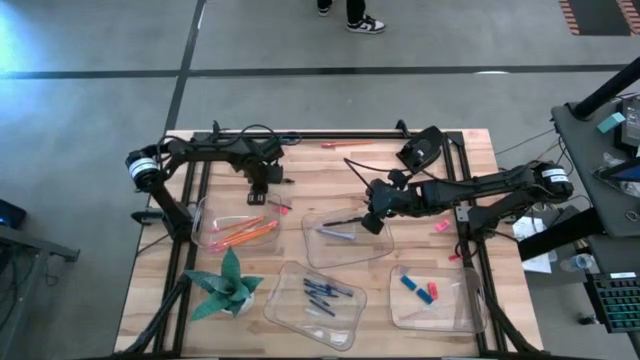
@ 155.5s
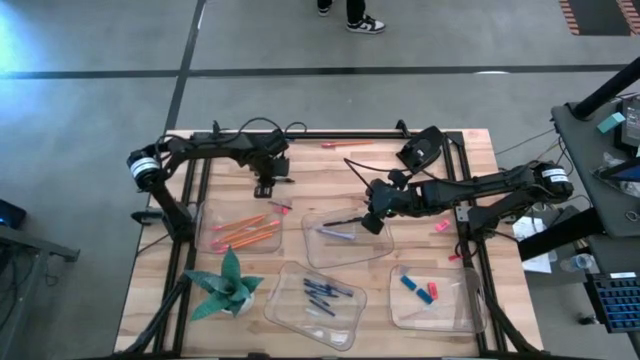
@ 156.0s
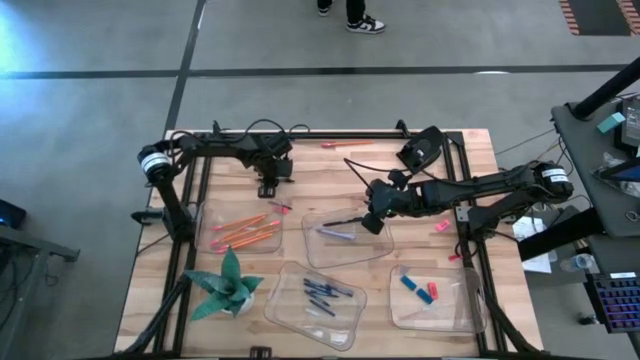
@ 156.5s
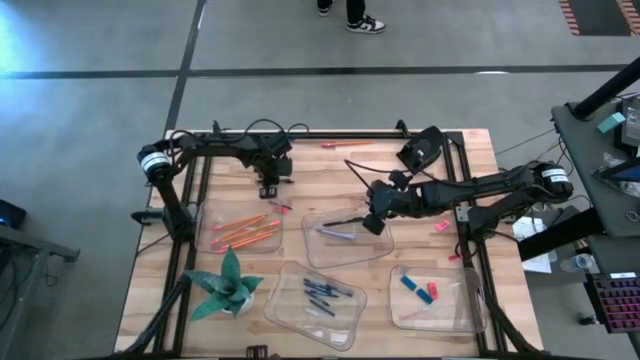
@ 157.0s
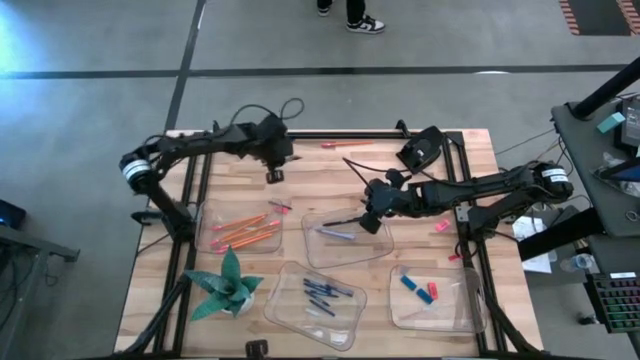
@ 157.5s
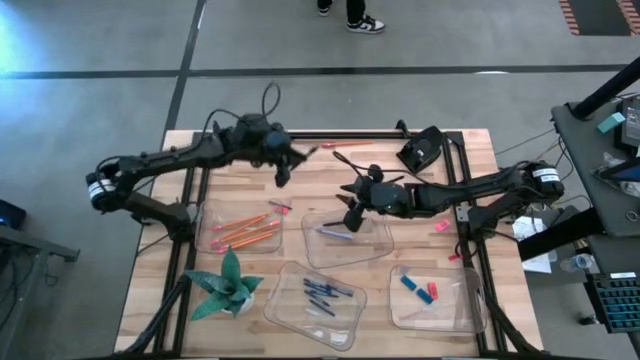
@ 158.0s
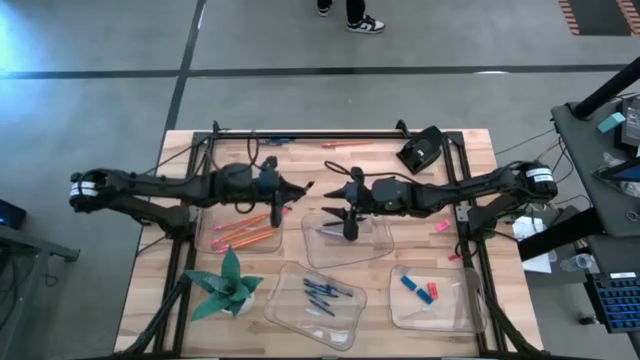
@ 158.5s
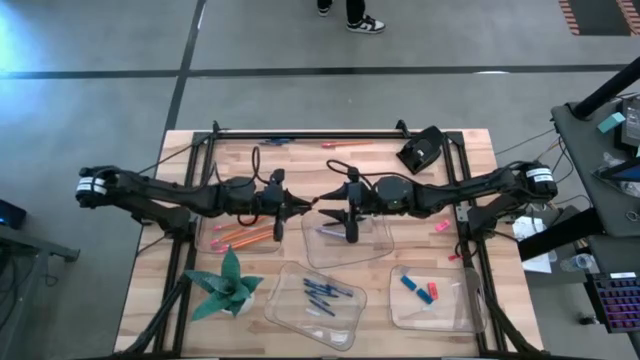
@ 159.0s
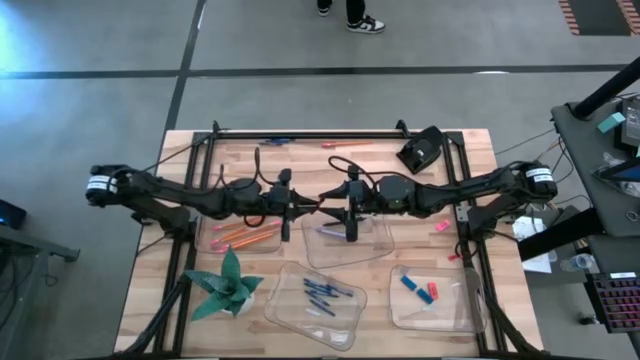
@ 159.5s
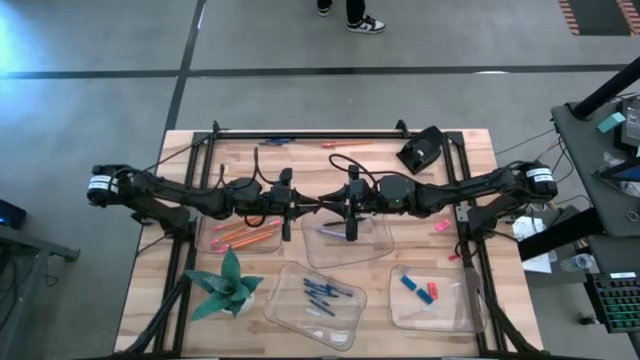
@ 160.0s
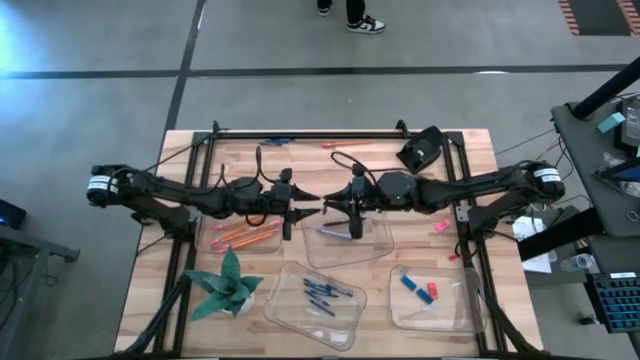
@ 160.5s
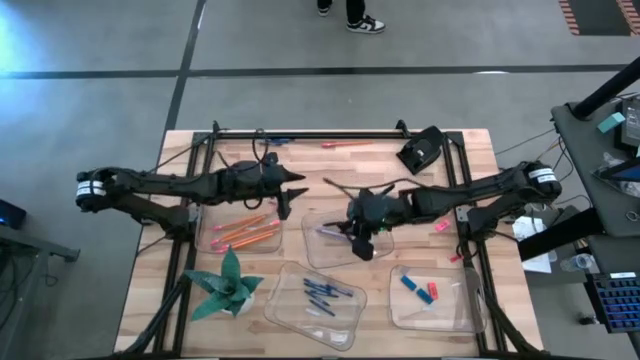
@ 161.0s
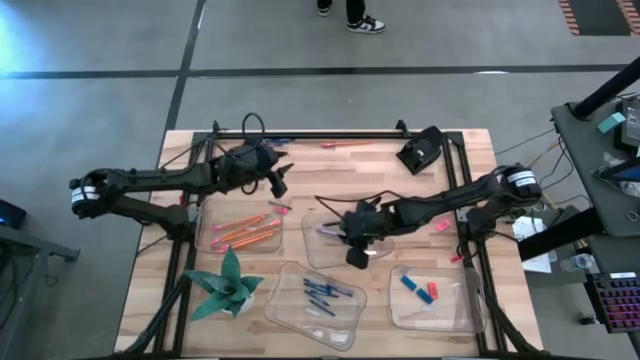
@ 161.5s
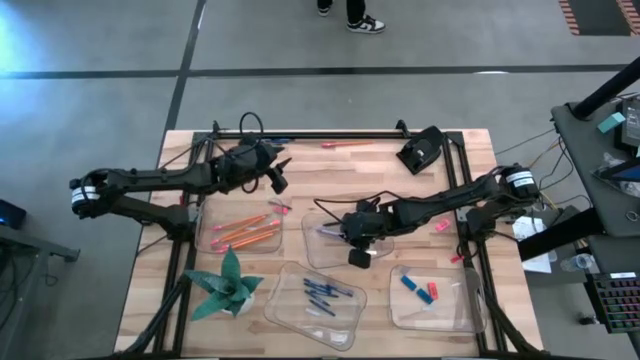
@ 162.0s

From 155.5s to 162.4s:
Task: Sort crayons/erasers/pens/pencils in bins
Put the black pen into the top right transparent bin

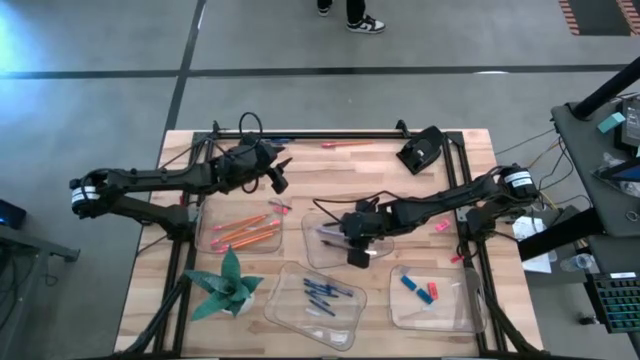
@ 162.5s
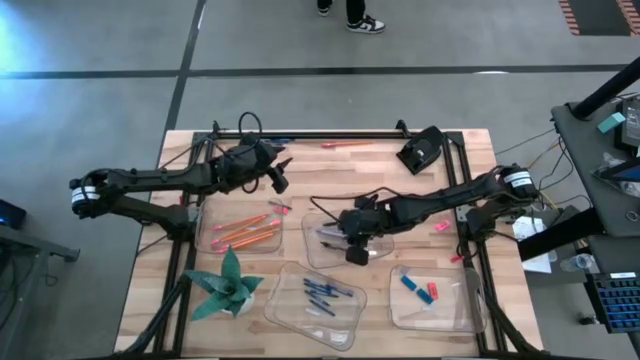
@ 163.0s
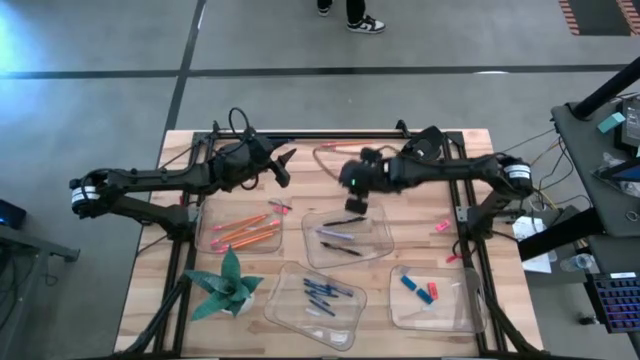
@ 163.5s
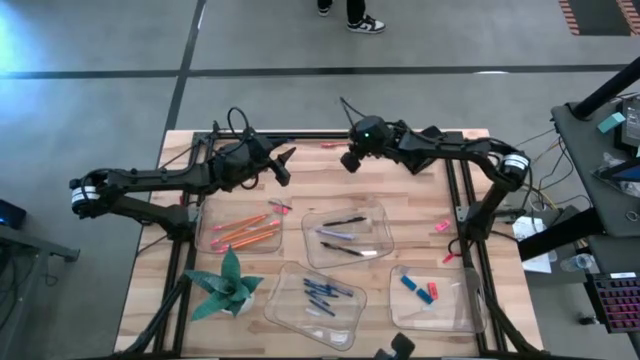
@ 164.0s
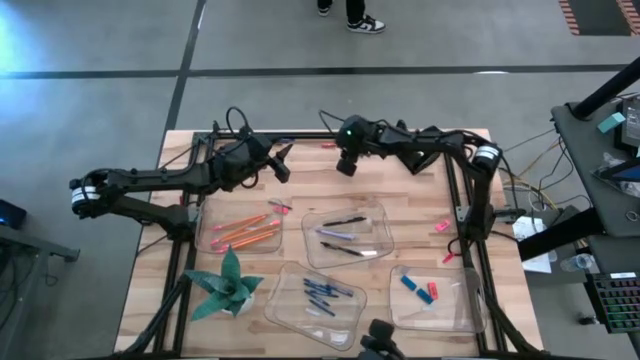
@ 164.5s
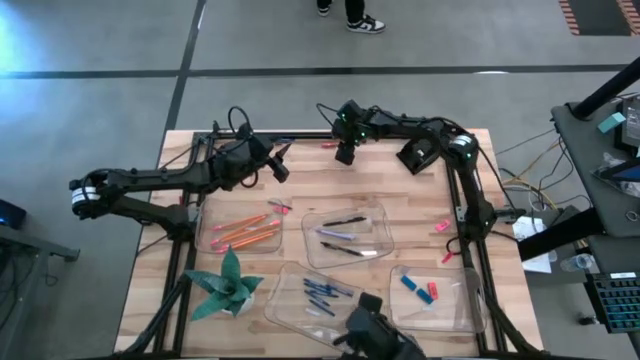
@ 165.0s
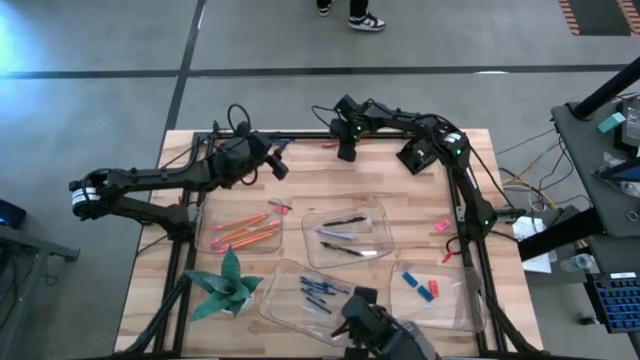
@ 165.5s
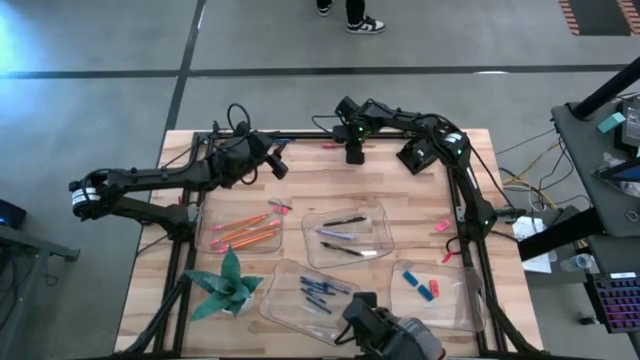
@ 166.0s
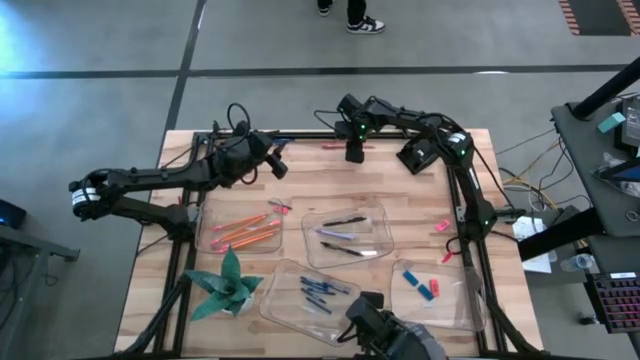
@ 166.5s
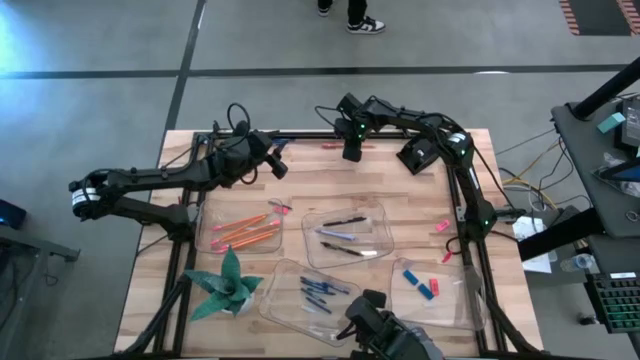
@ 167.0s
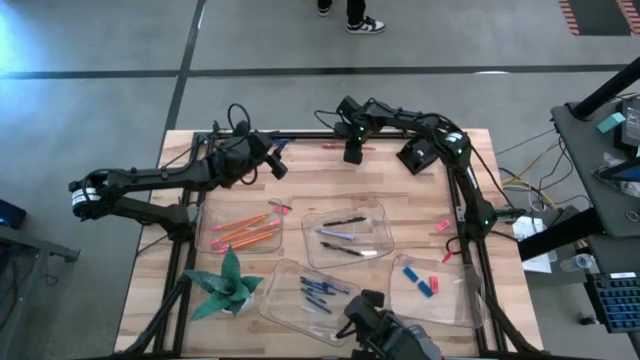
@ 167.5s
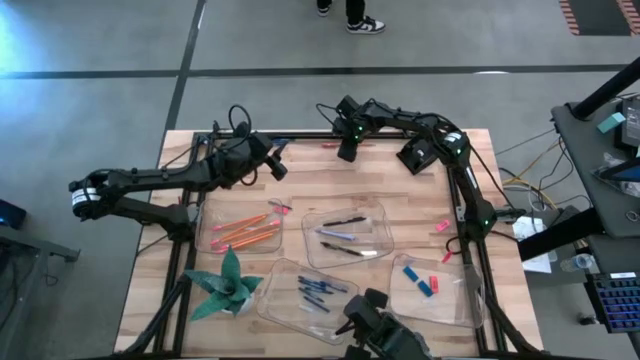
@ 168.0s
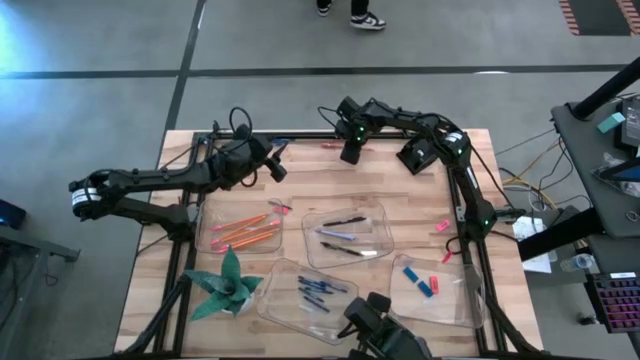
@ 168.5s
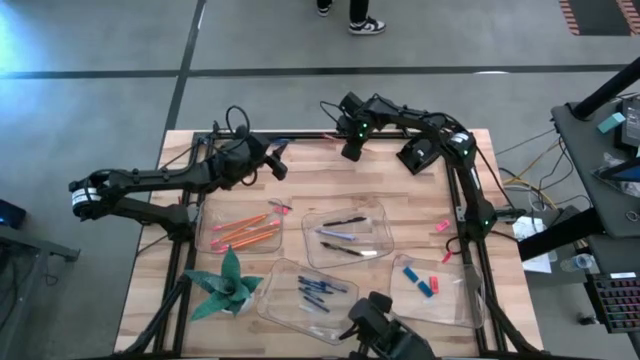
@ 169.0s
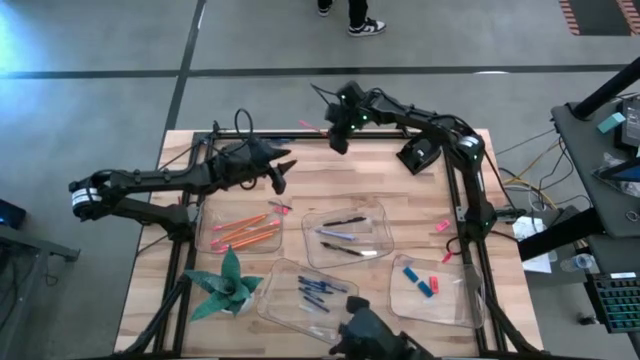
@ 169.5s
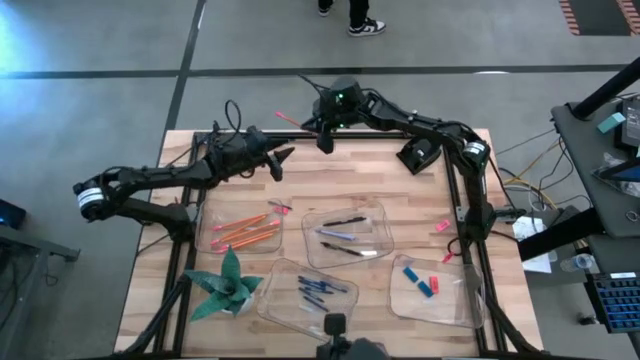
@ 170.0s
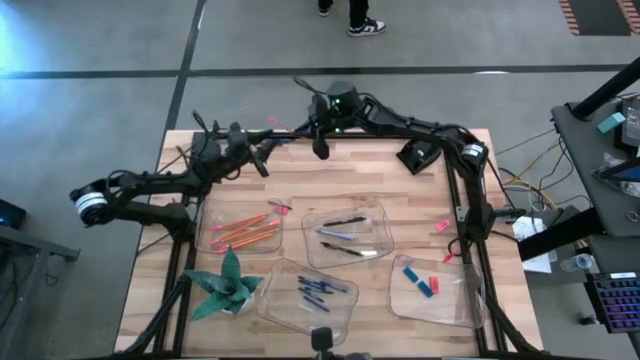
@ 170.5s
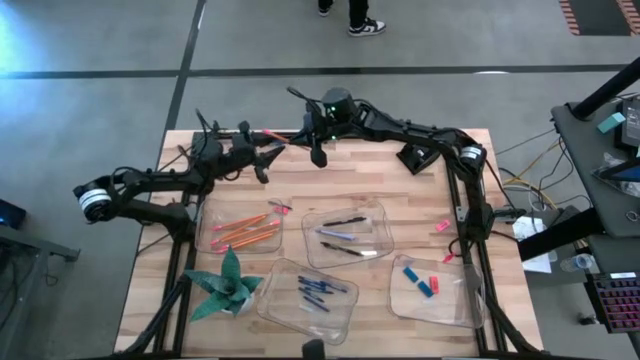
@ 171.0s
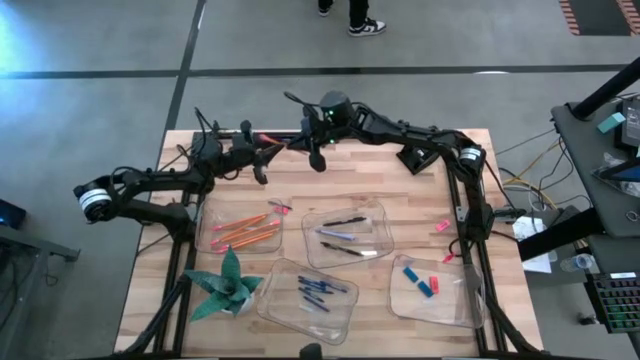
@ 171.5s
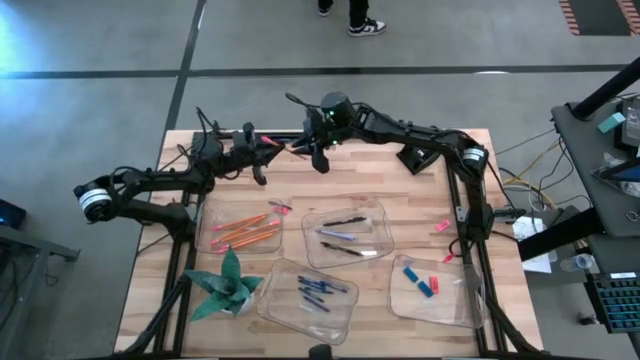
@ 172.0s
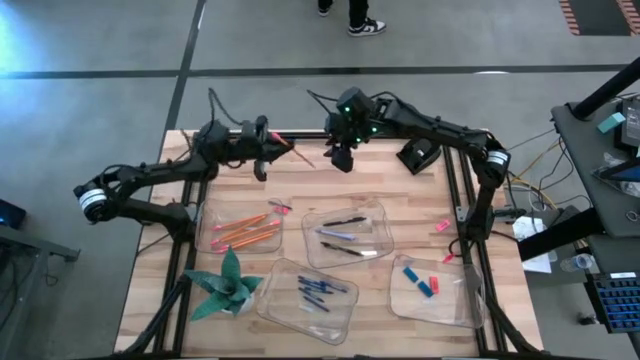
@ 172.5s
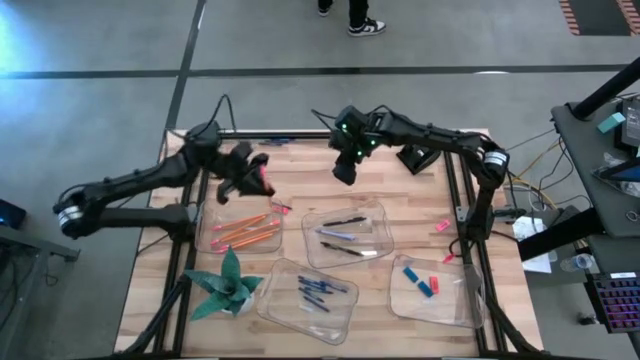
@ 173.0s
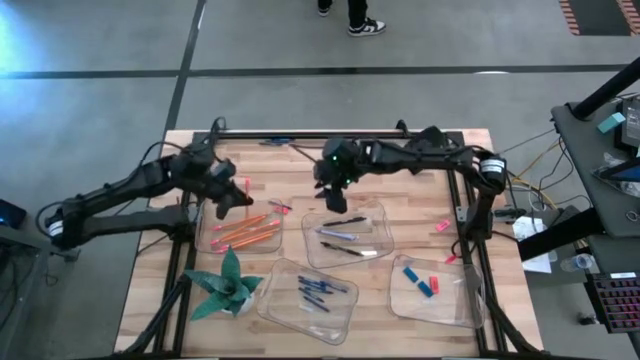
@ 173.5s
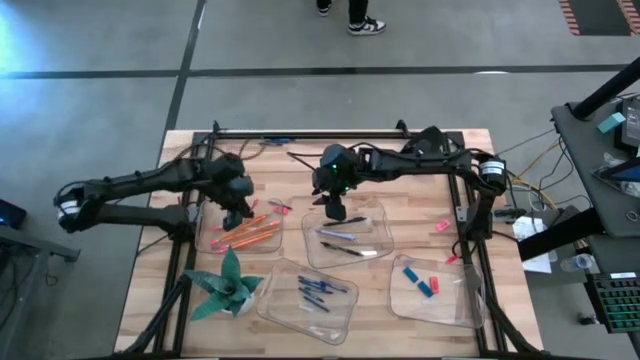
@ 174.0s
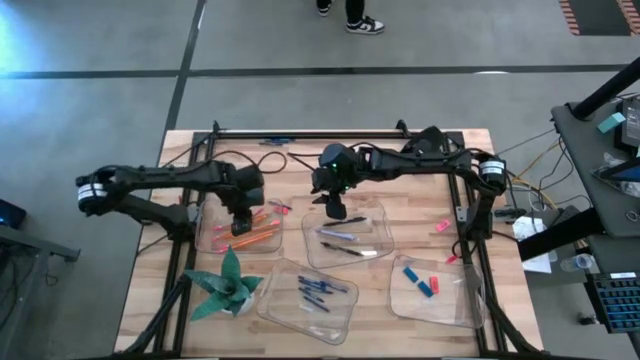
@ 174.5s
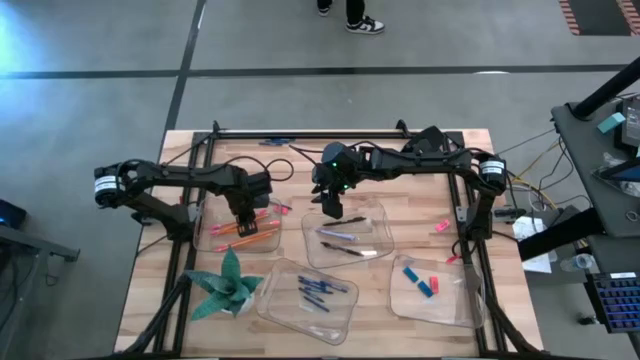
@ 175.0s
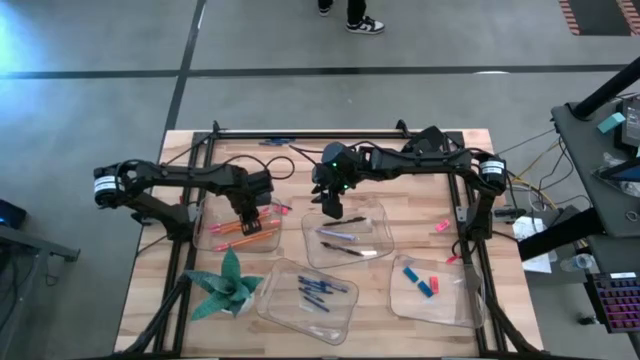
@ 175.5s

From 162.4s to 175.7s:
Put the orange pencil into the top left transparent bin
